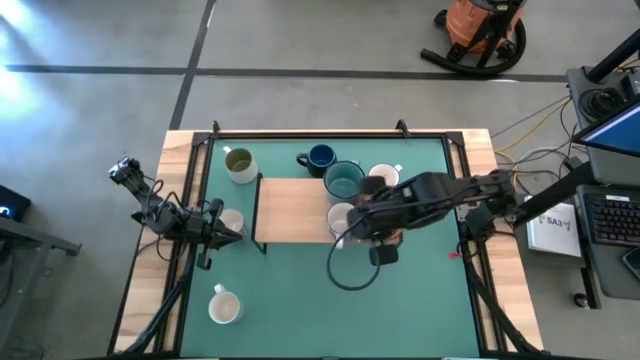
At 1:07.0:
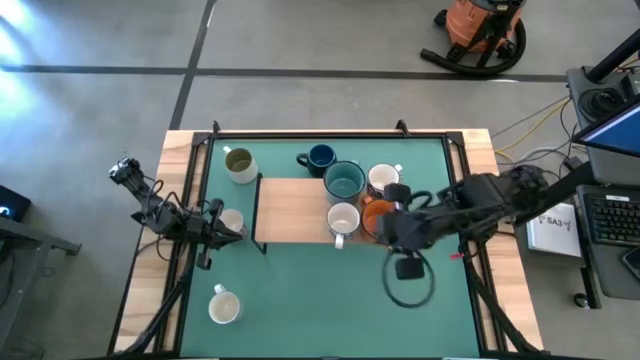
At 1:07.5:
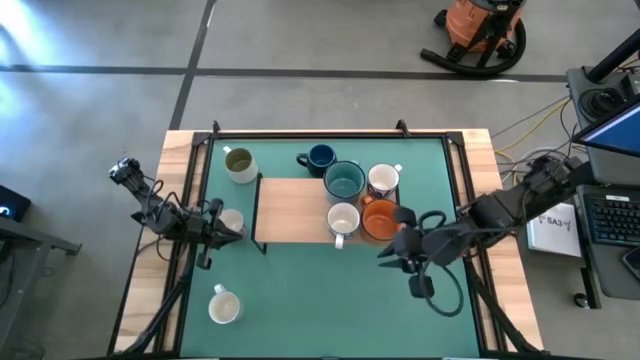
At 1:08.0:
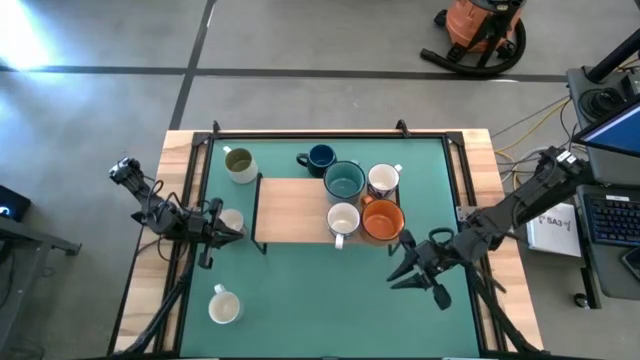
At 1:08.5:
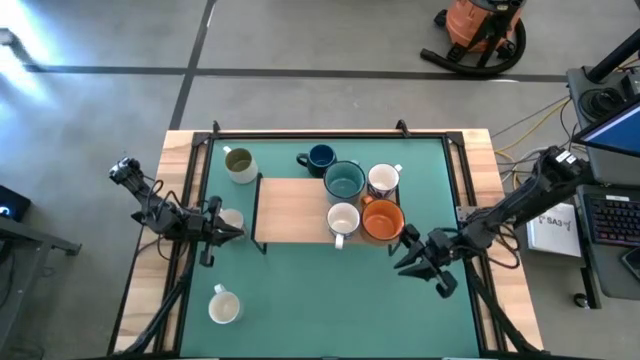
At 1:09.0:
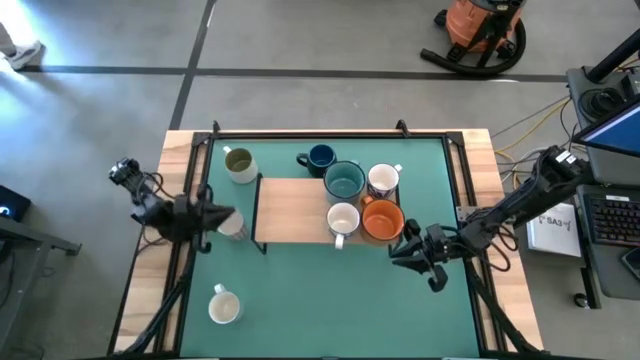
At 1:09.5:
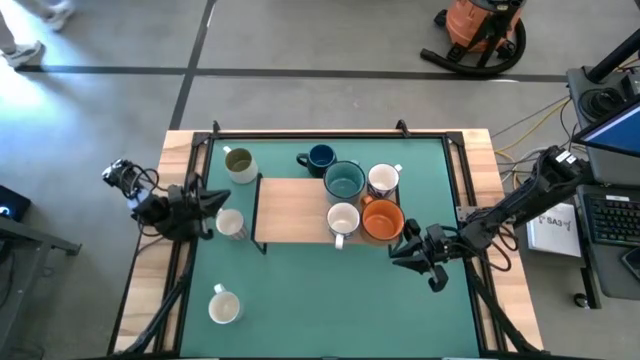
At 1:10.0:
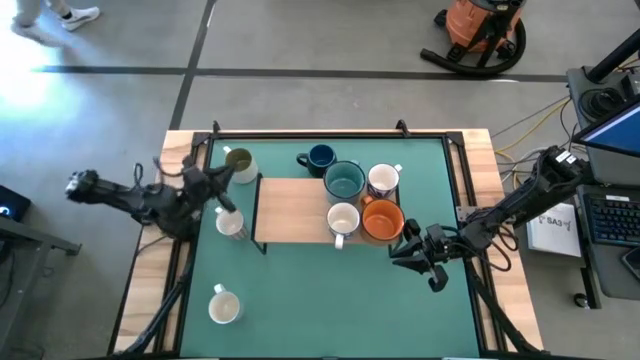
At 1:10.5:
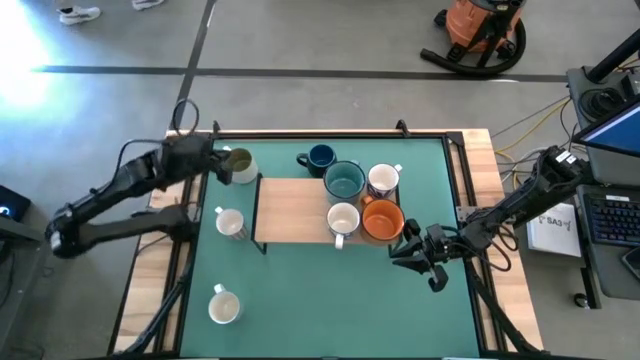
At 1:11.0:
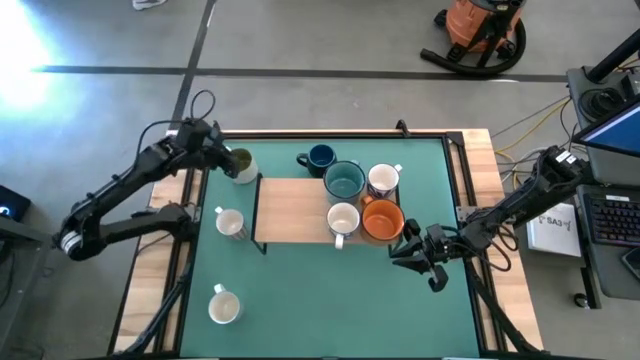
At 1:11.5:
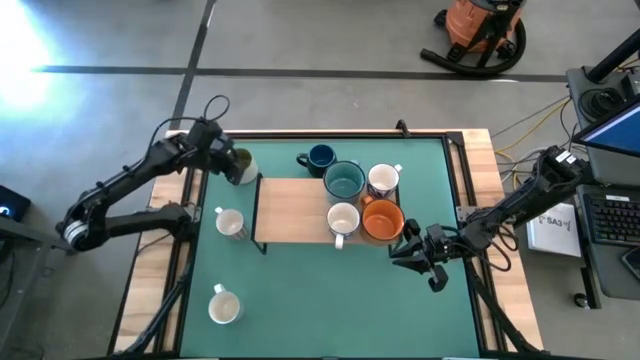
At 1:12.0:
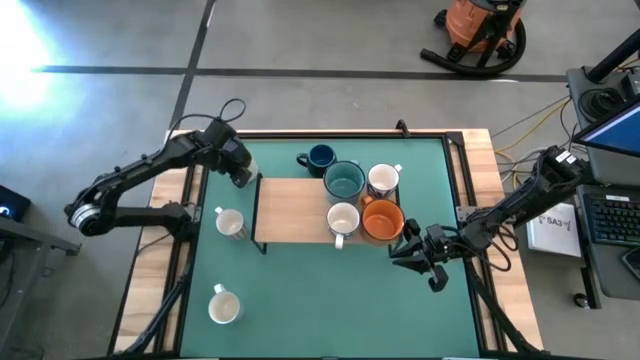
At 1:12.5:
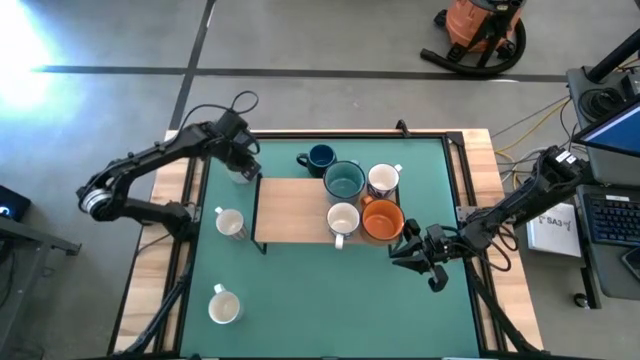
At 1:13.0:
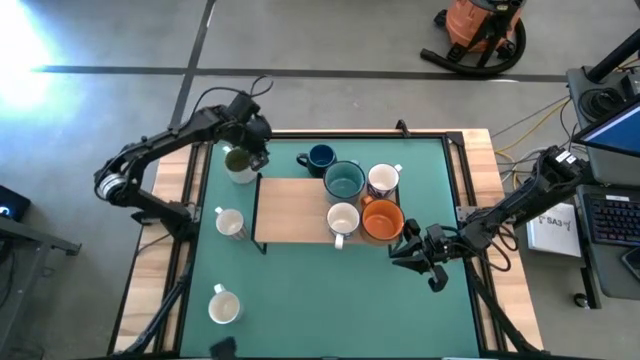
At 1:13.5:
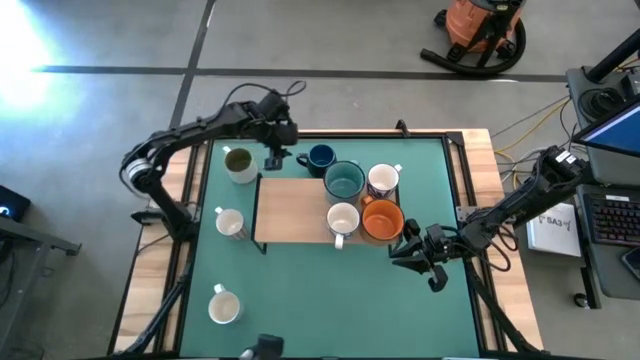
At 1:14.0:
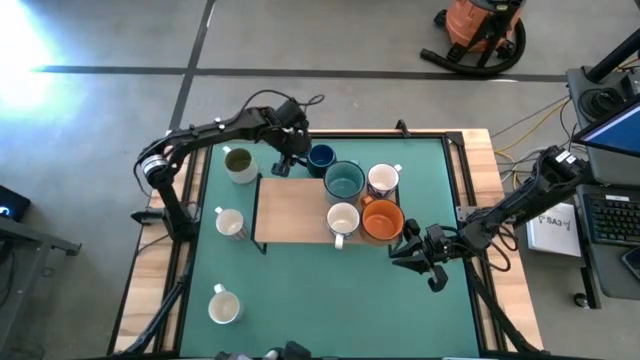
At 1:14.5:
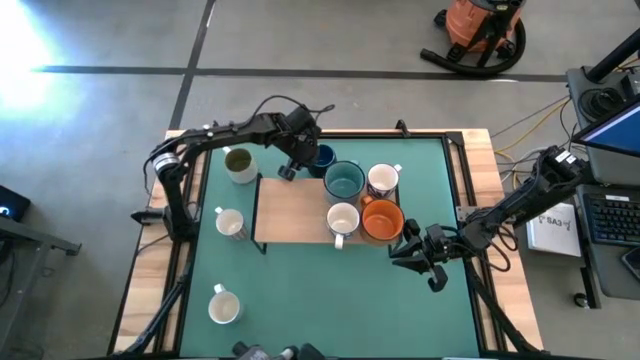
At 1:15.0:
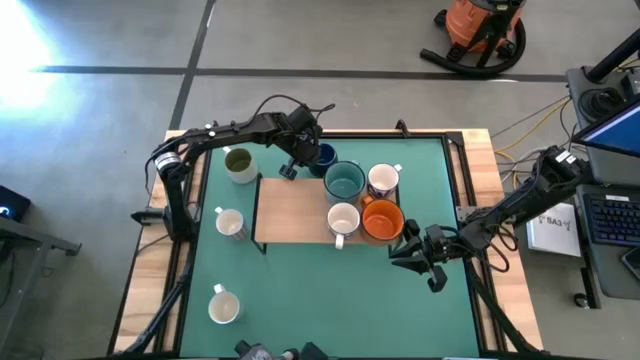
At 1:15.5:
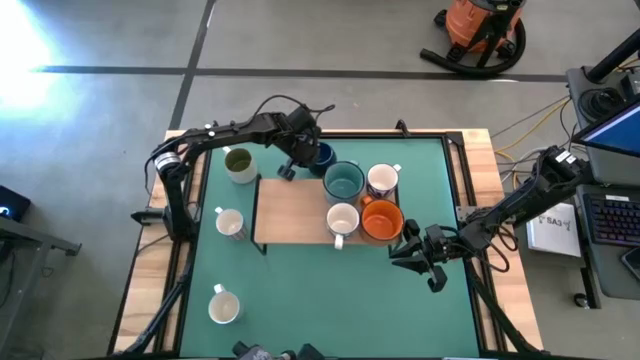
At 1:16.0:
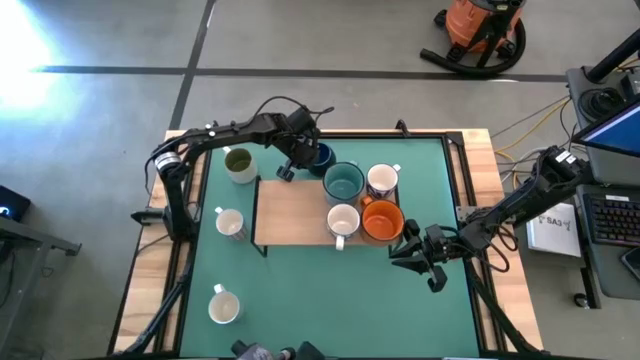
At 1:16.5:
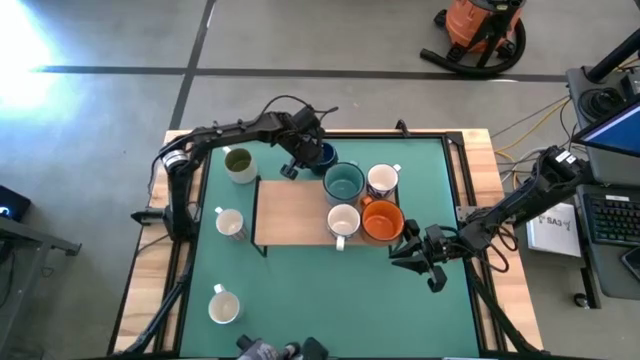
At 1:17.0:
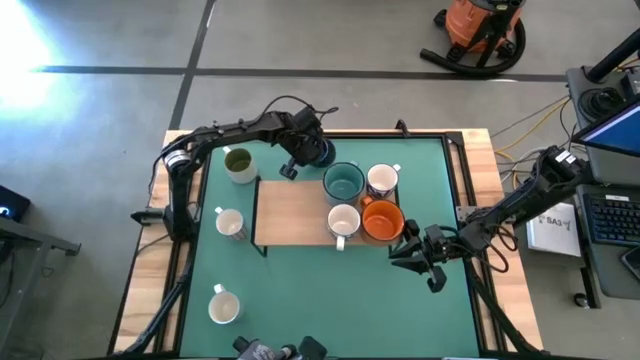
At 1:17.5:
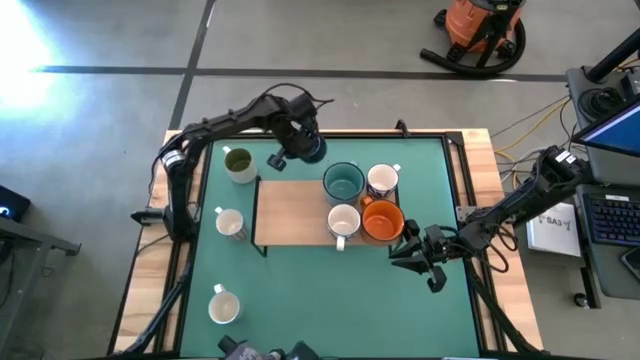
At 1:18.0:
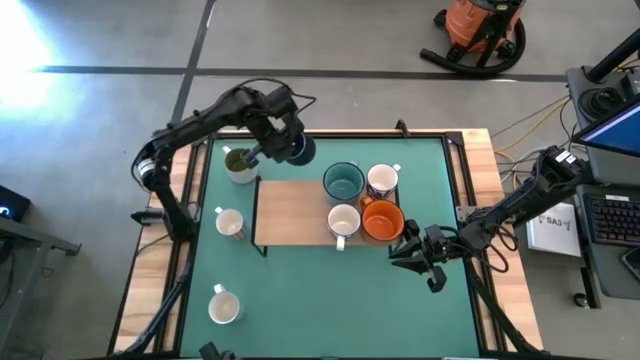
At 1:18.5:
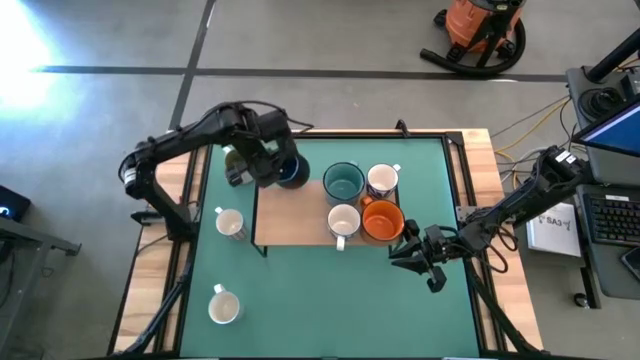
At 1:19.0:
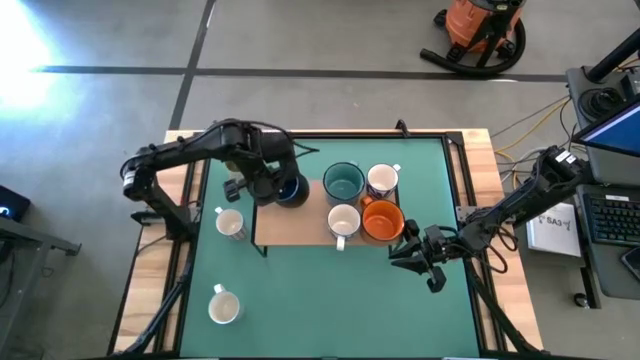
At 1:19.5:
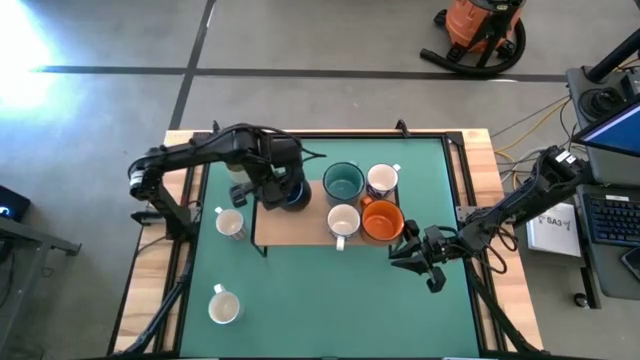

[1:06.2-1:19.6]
Task: Place coffee mugs
Put the black blue mug on the shelf

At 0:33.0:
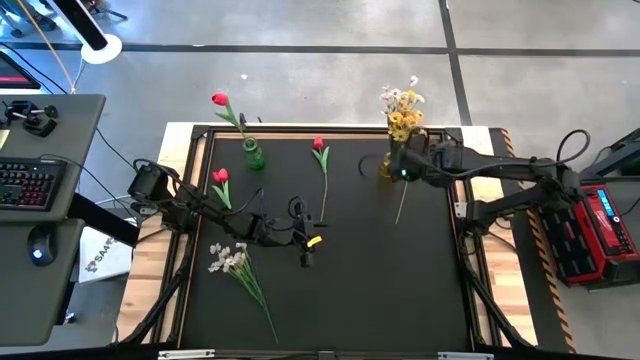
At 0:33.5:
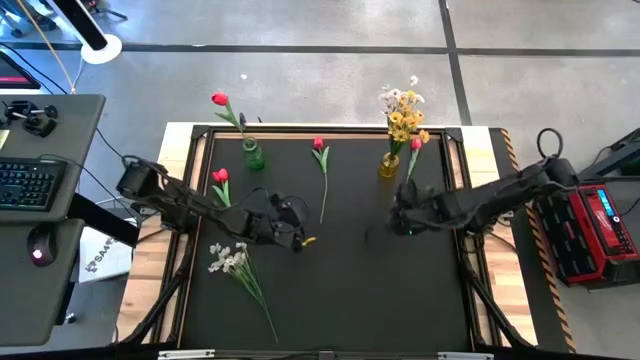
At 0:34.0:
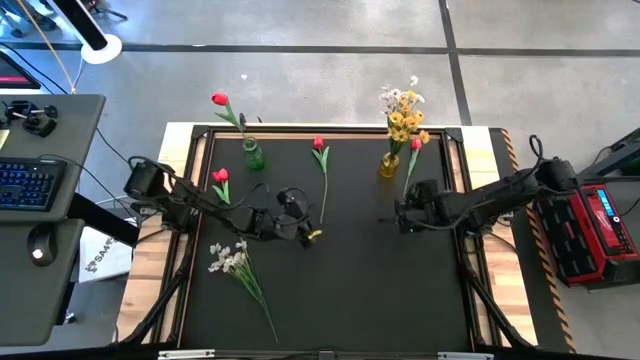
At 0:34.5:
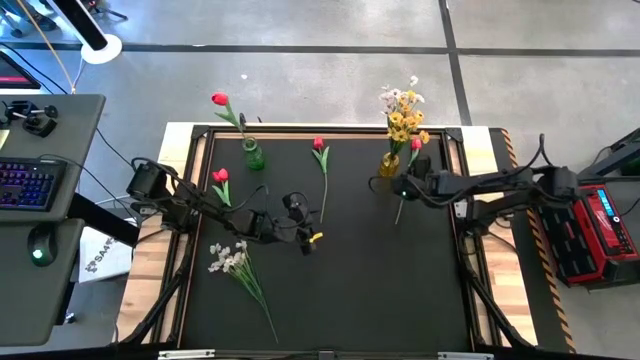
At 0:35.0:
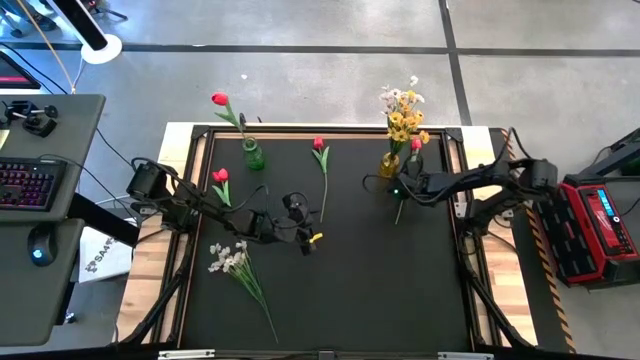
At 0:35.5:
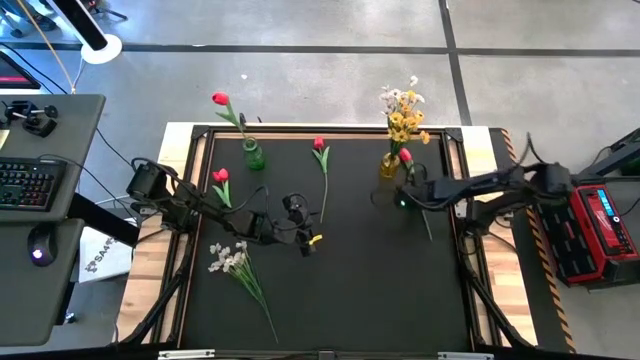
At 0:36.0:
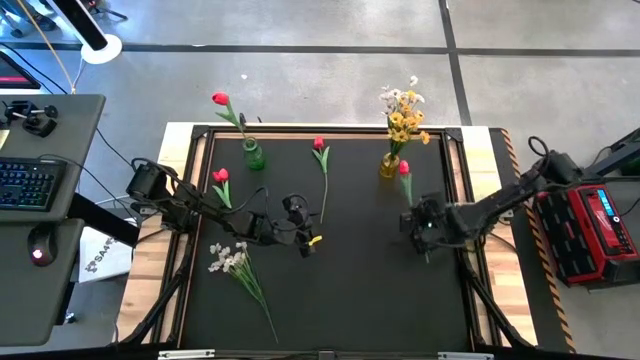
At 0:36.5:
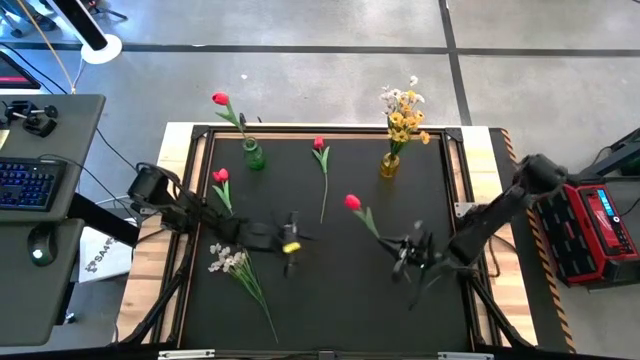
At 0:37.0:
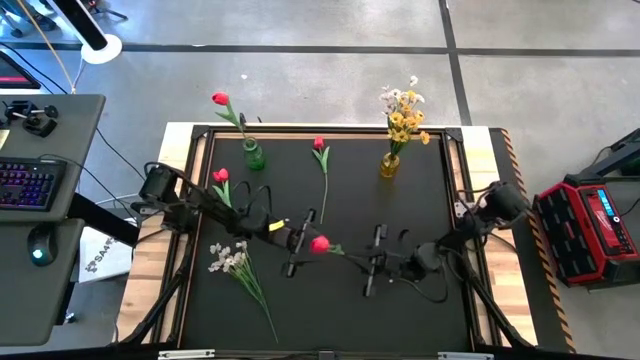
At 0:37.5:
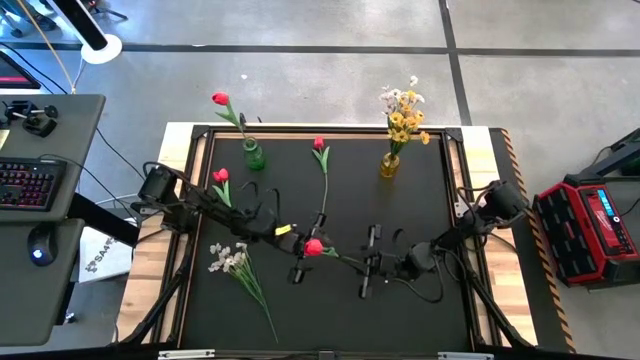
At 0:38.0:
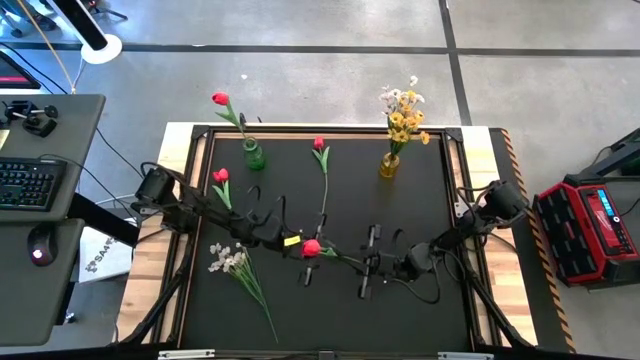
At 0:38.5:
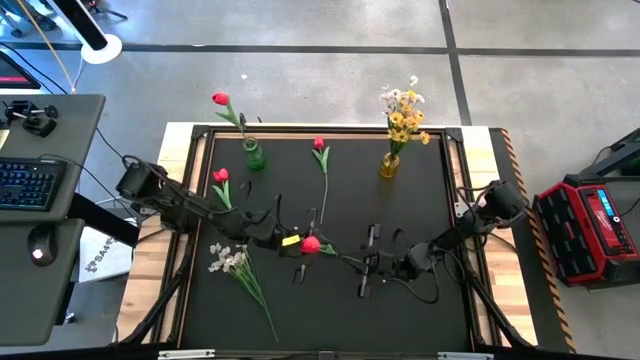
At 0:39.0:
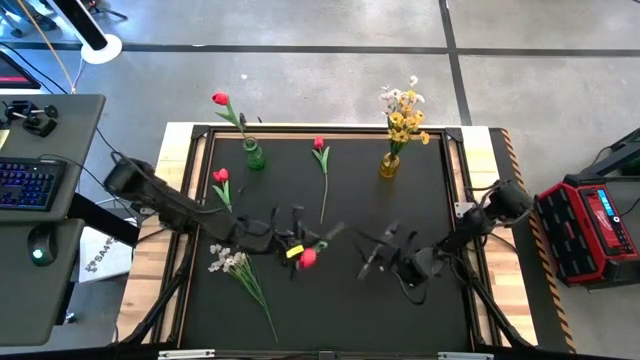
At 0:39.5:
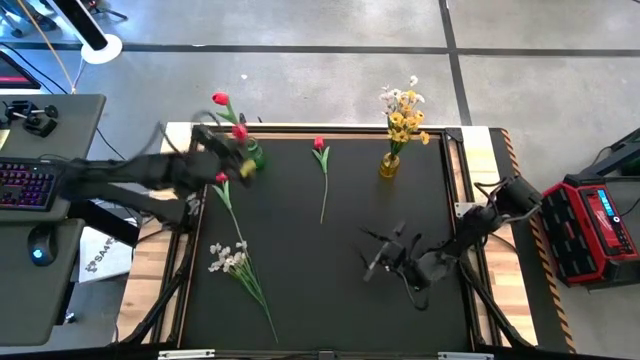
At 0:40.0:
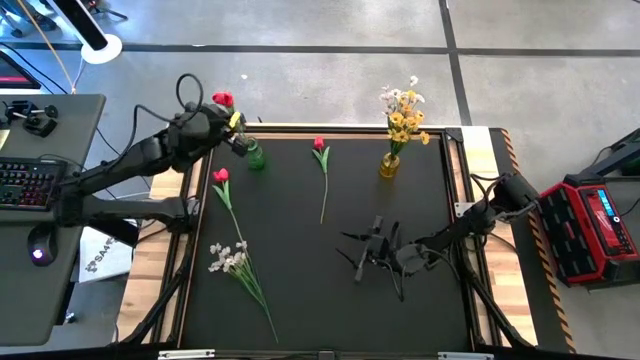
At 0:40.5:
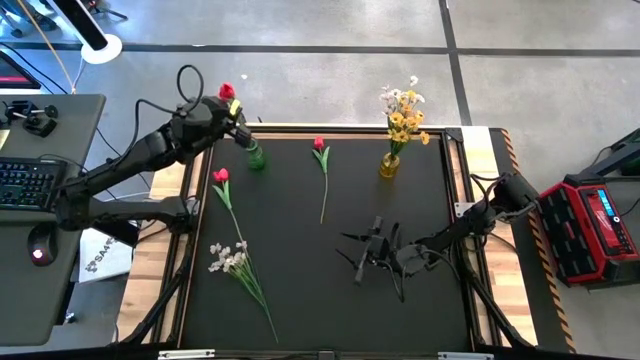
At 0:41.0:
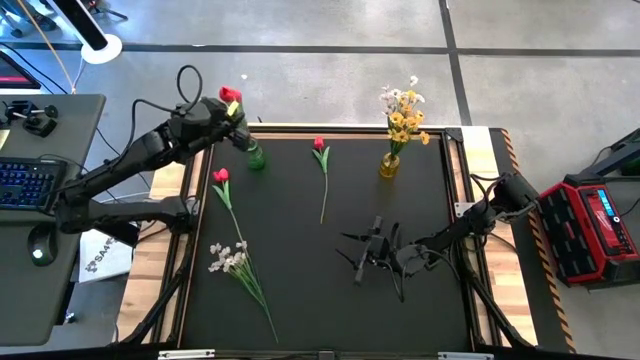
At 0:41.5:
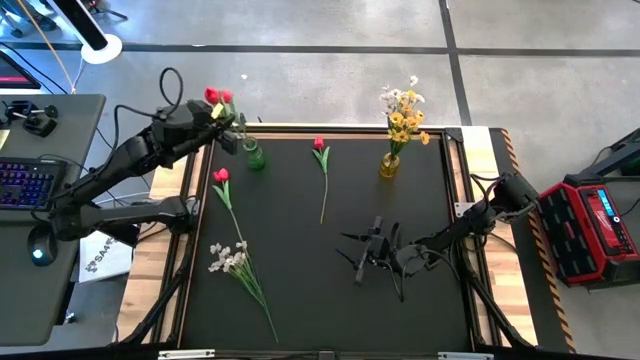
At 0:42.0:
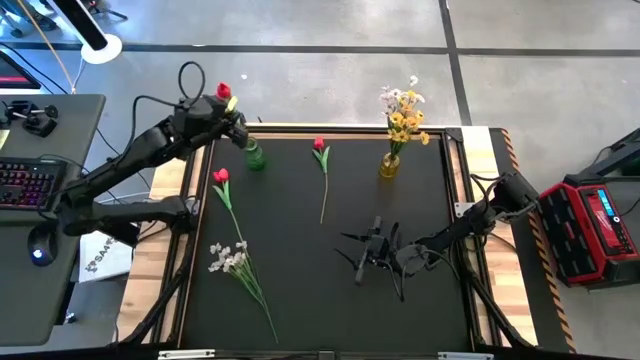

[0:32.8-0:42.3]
Task: Sort flowers into vase by color
Put the right red tulip into the green flower vase
